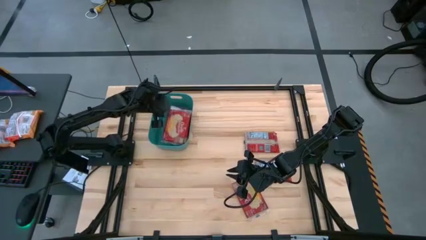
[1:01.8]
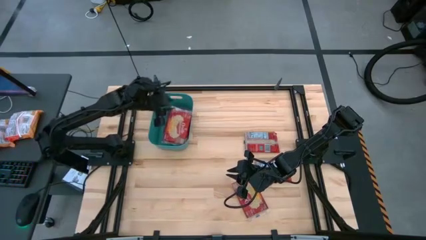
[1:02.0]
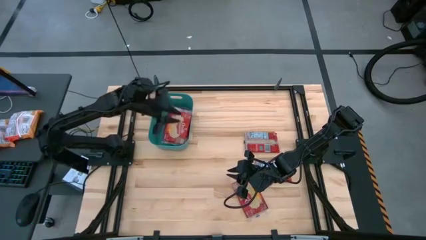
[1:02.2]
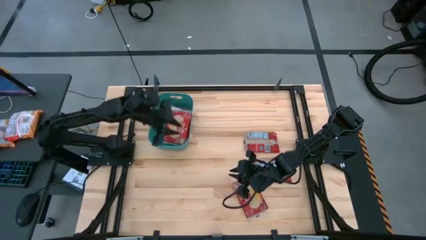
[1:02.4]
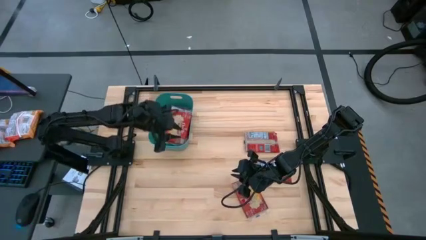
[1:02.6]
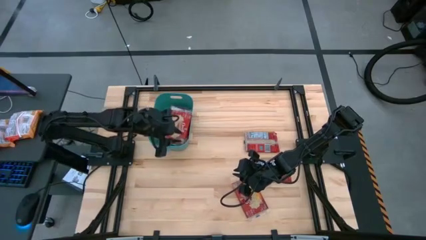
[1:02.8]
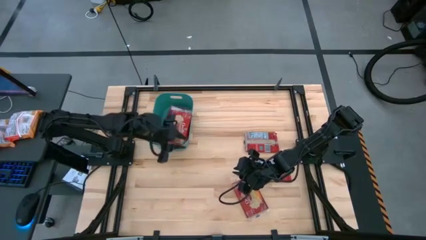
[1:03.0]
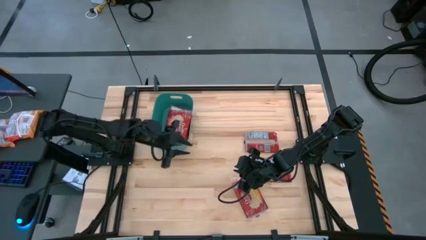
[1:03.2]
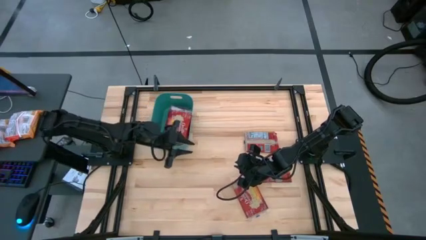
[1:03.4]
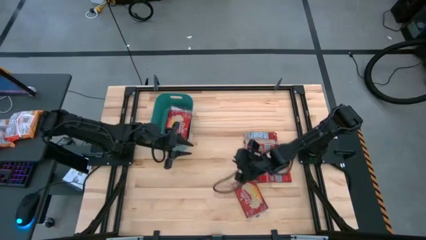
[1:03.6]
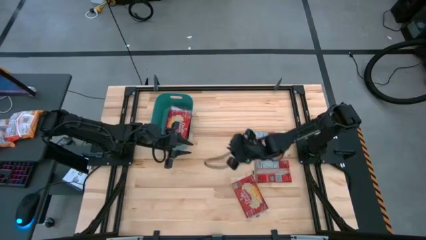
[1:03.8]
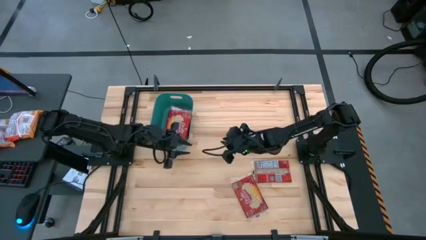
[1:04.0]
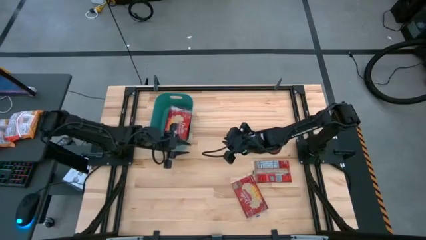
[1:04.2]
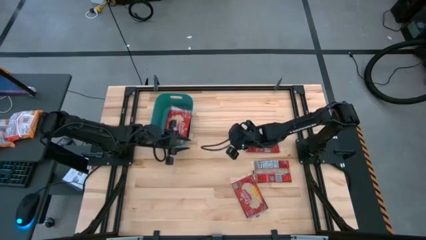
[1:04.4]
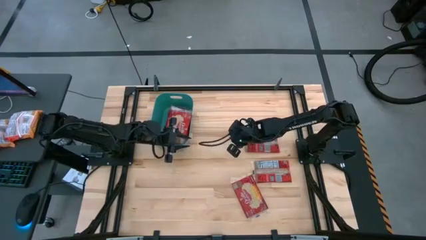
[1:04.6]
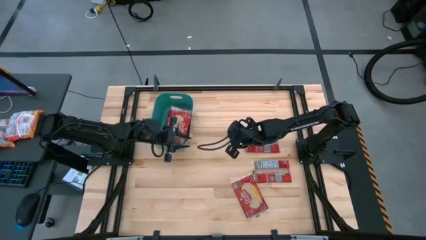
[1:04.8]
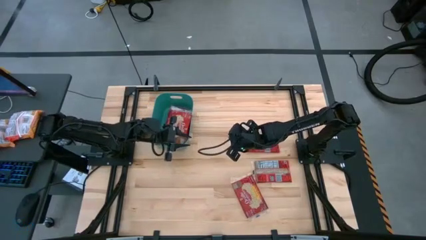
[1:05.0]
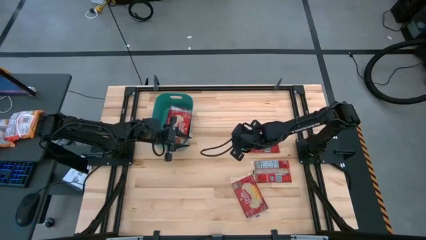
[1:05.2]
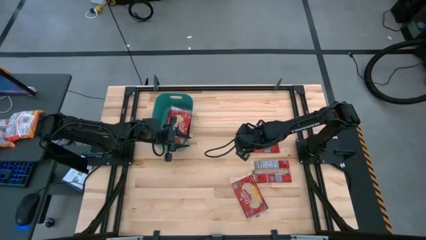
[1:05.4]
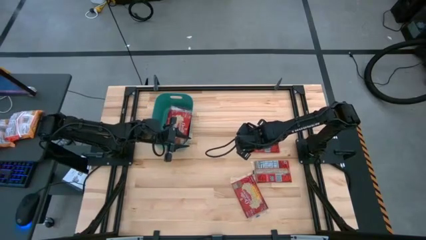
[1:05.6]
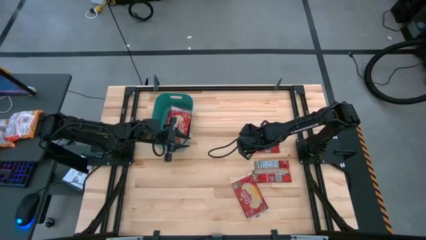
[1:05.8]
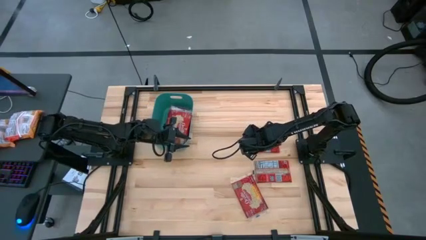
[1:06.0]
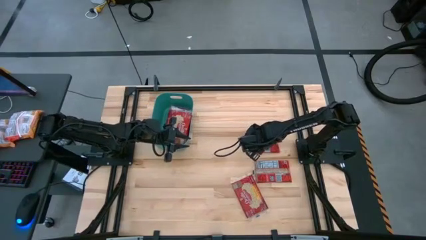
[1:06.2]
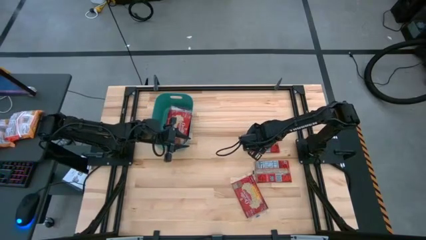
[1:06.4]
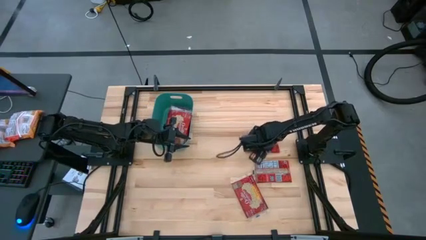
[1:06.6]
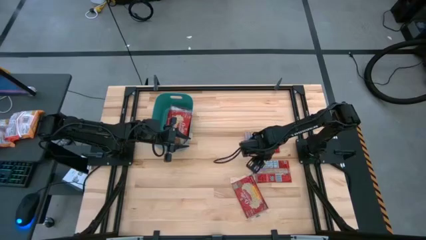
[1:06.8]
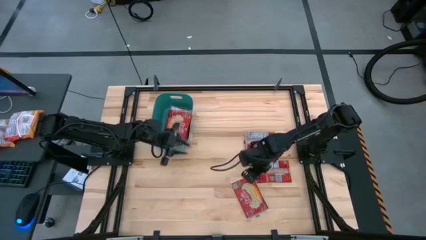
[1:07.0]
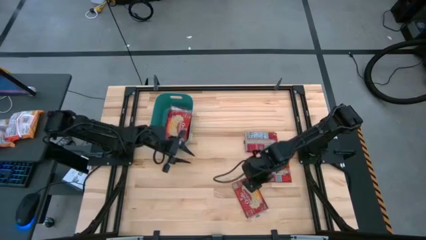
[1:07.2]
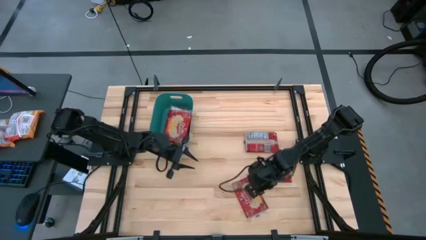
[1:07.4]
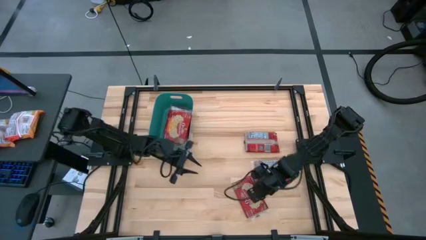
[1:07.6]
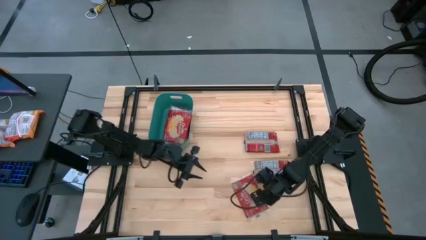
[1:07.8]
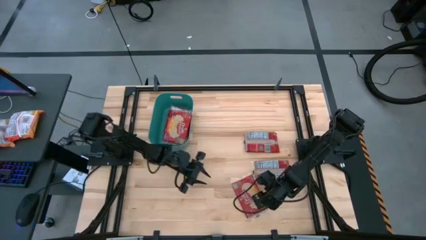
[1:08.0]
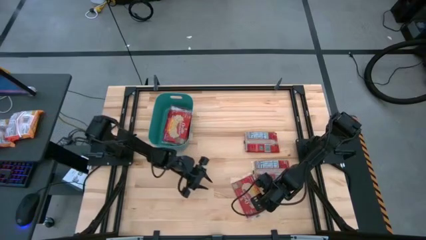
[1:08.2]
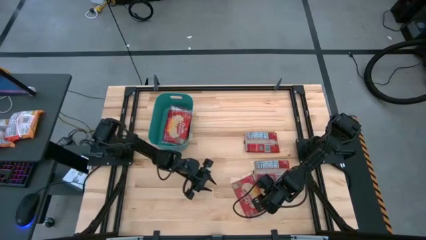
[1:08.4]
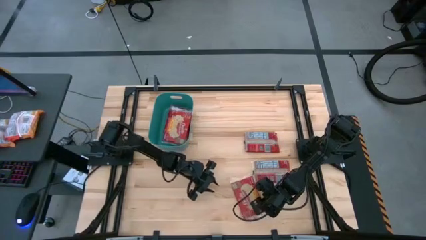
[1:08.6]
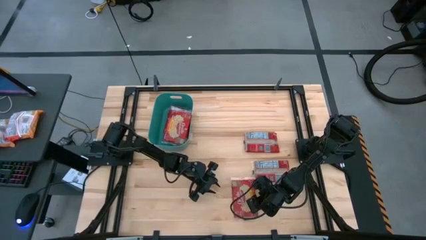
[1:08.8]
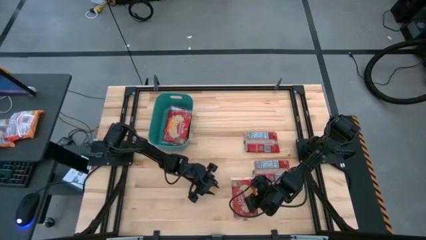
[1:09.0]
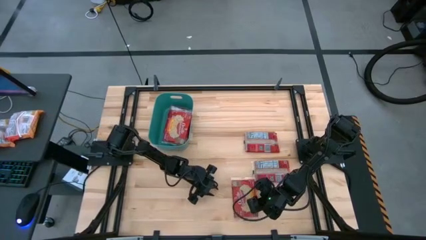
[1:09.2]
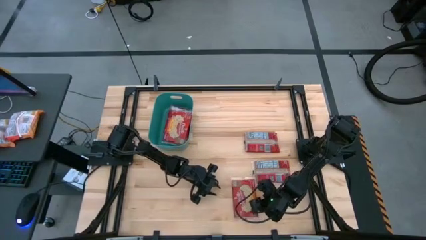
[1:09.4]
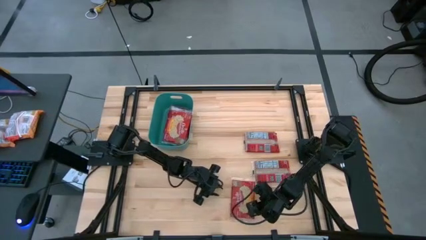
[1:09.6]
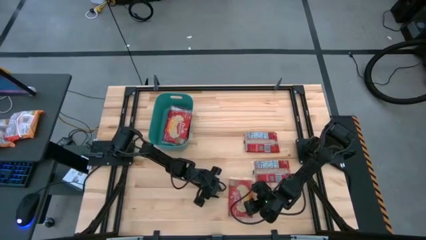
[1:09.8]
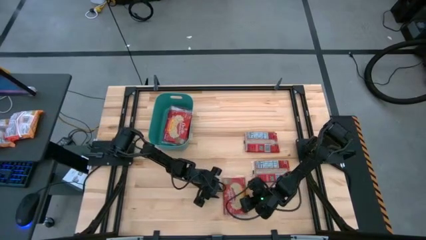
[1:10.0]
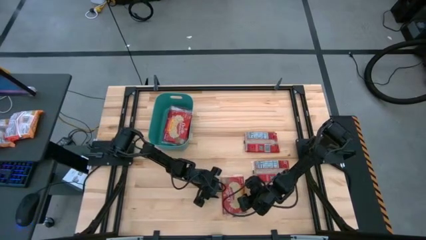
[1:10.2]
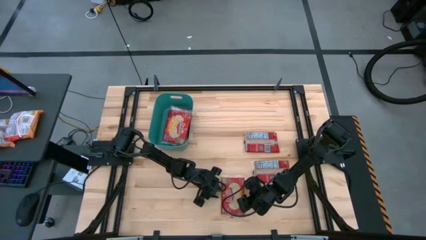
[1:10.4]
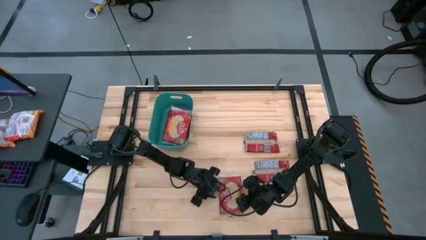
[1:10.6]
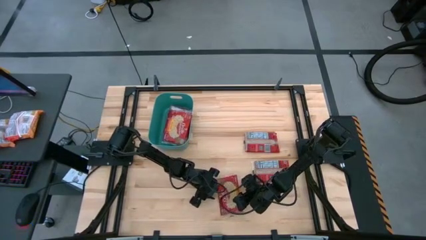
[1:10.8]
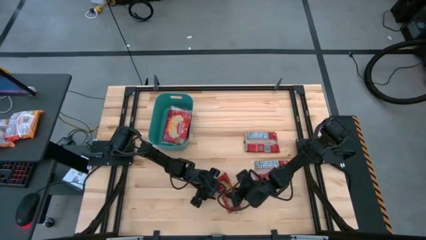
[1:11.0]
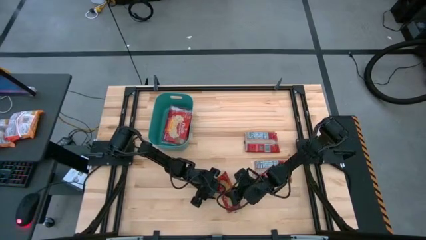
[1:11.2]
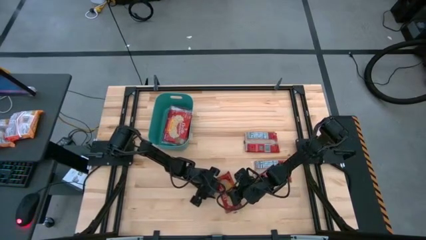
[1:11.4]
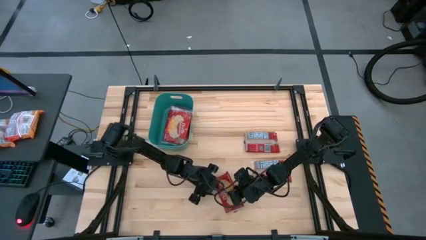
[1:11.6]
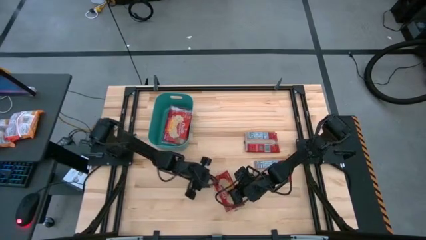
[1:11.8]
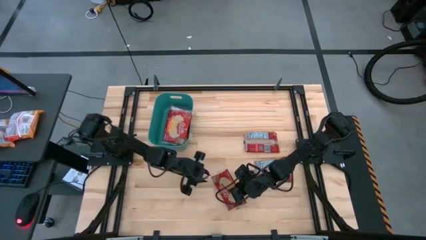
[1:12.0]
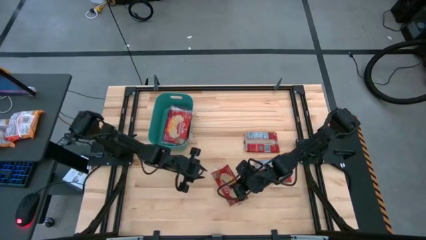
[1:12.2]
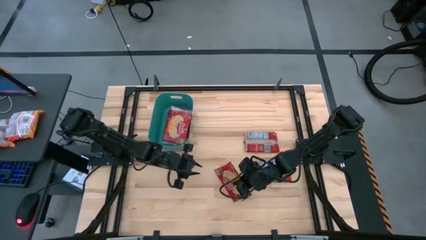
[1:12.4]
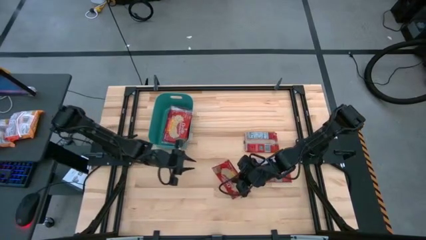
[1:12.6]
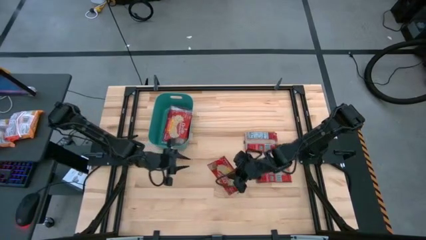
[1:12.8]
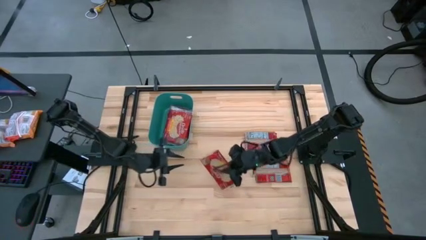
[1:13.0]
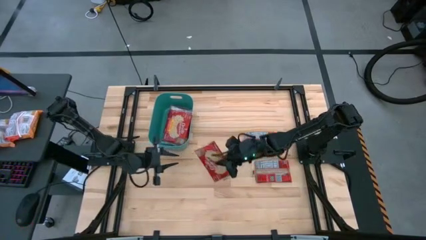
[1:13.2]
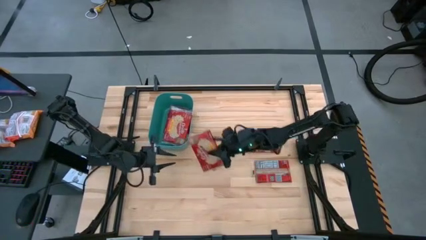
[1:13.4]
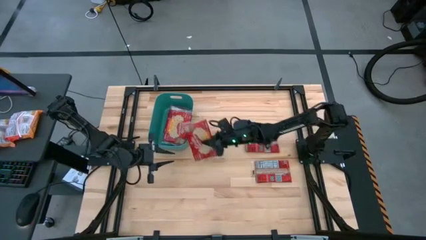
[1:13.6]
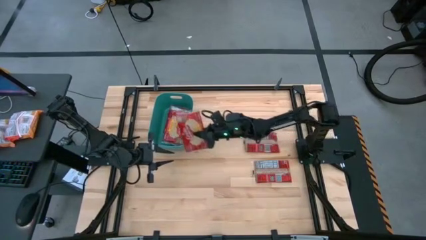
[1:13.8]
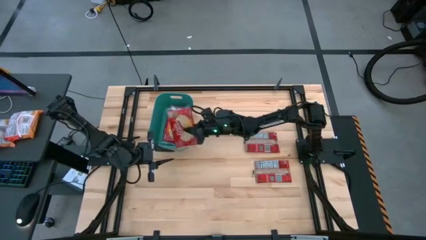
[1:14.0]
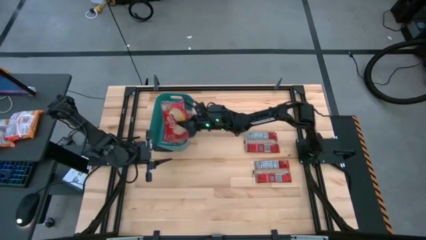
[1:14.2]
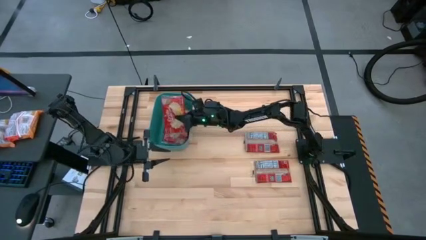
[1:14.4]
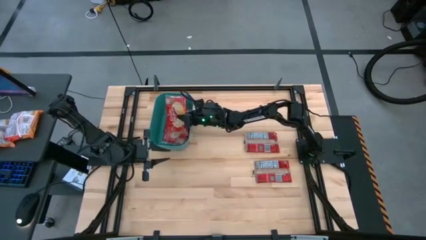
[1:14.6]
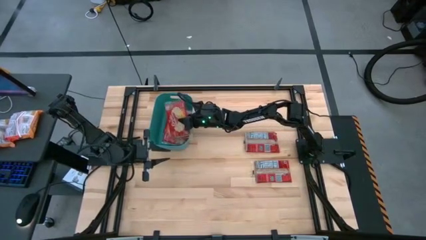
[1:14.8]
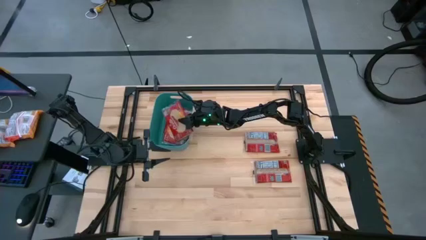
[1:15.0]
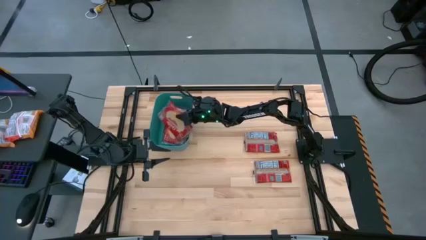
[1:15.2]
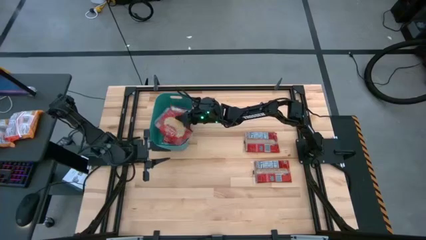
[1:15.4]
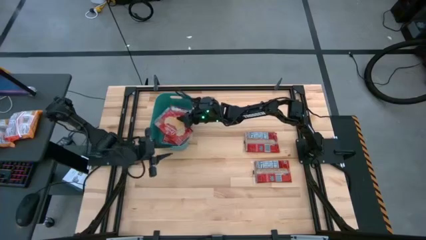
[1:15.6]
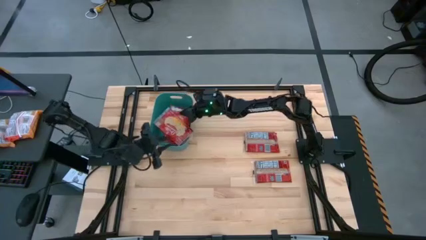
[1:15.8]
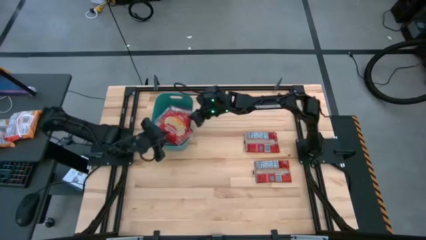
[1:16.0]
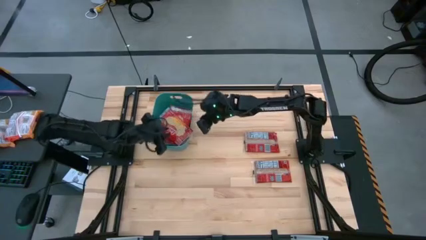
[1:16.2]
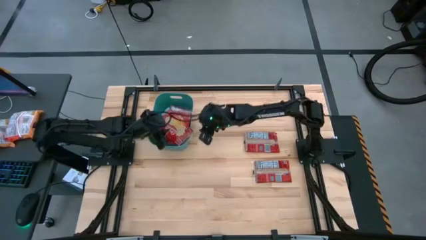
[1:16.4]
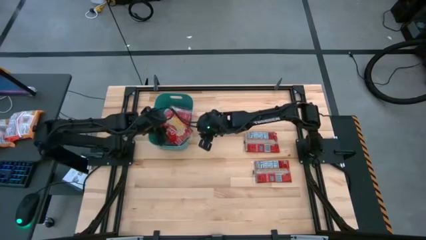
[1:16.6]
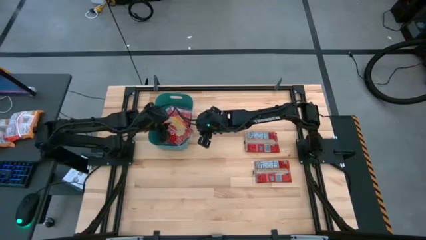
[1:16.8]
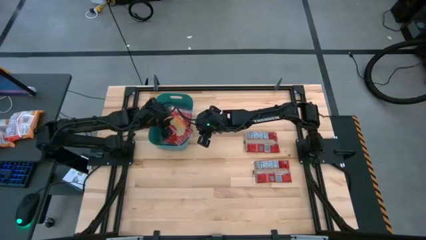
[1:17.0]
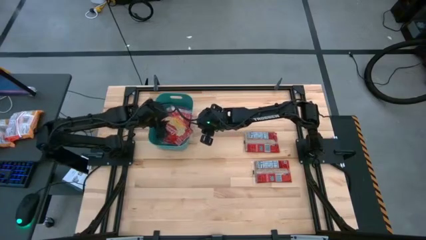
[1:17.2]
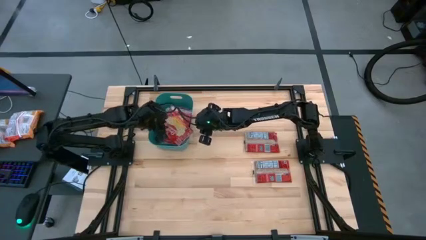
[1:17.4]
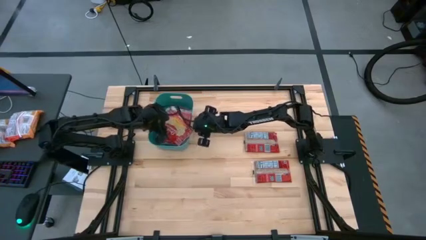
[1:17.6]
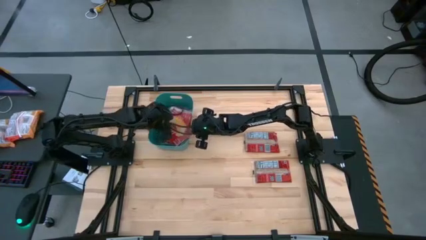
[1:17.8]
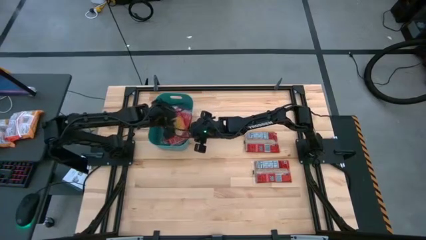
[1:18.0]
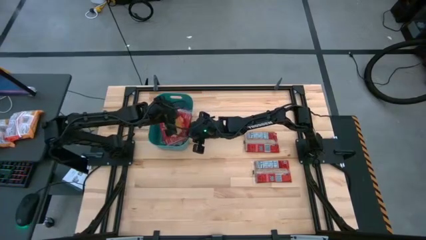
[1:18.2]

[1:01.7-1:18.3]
Task: Sort popcorn bags into baskets
Put the red popcorn bag into the green bin
